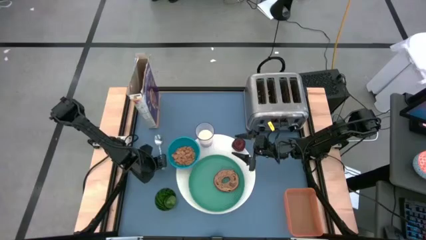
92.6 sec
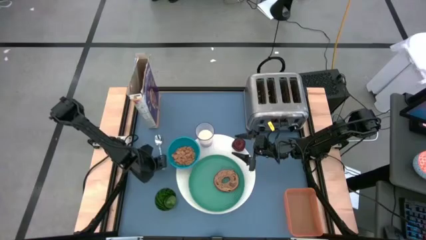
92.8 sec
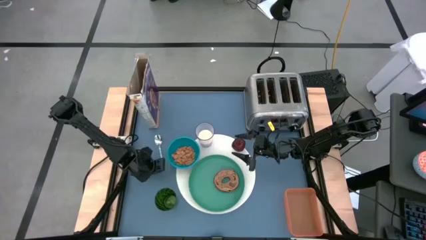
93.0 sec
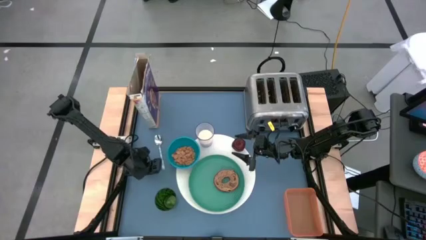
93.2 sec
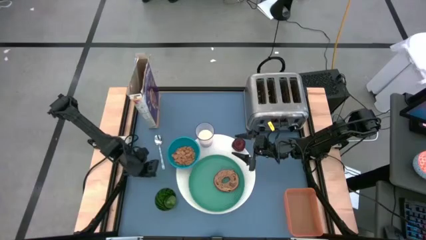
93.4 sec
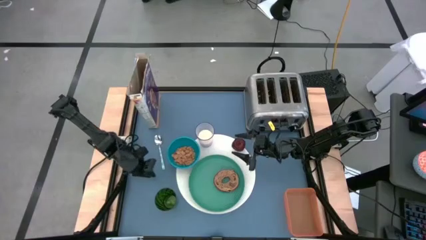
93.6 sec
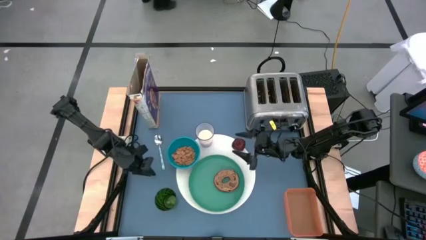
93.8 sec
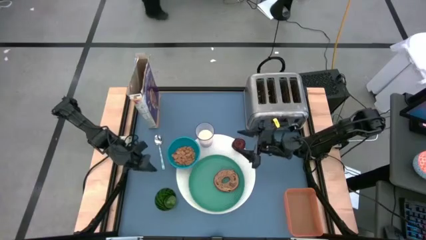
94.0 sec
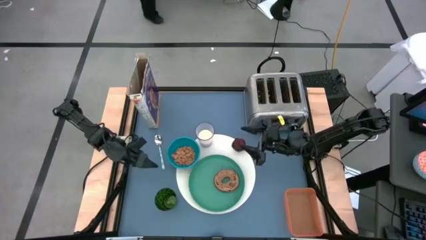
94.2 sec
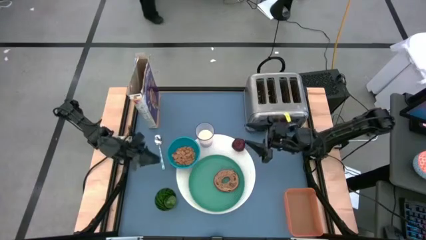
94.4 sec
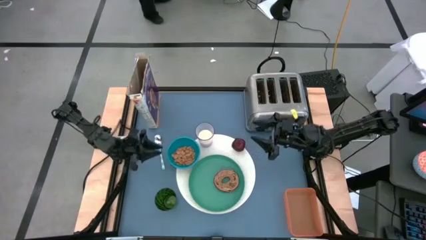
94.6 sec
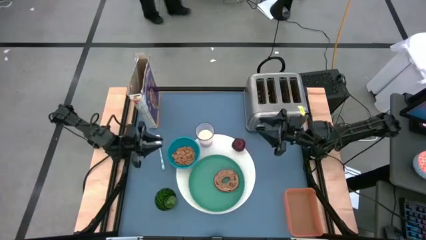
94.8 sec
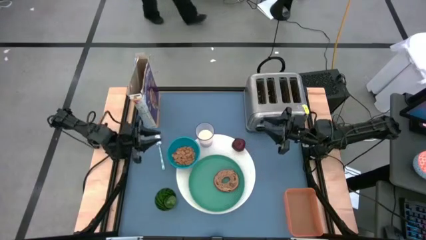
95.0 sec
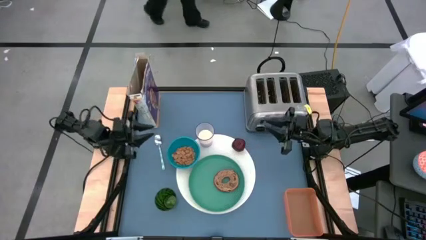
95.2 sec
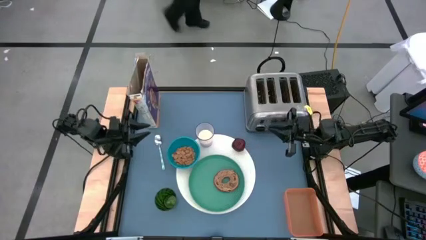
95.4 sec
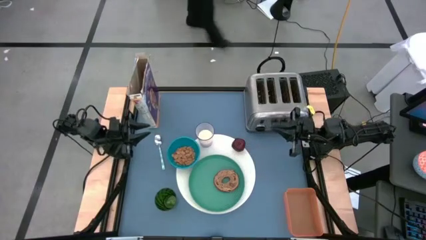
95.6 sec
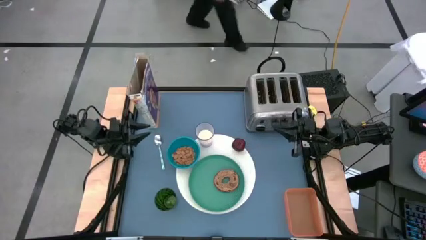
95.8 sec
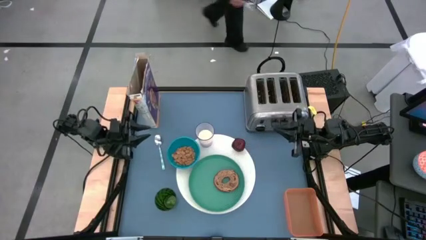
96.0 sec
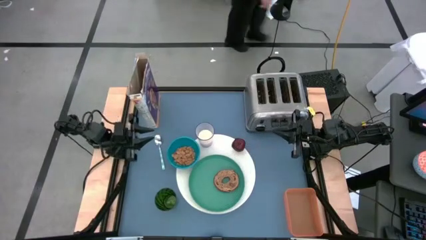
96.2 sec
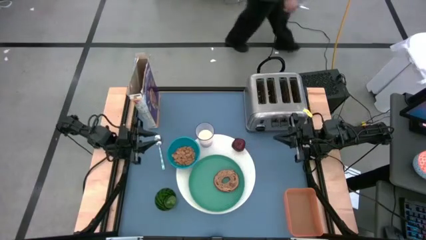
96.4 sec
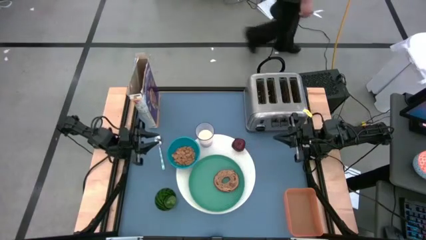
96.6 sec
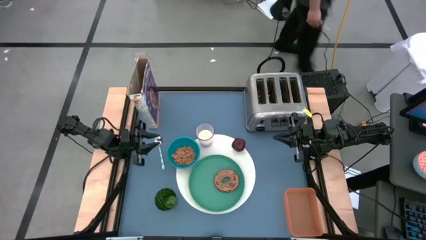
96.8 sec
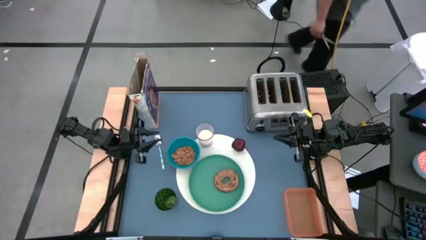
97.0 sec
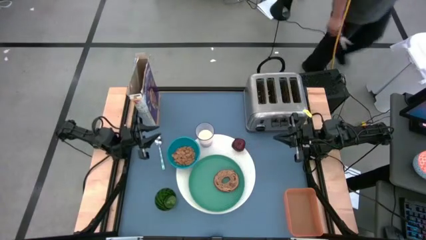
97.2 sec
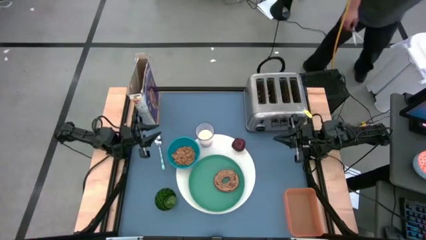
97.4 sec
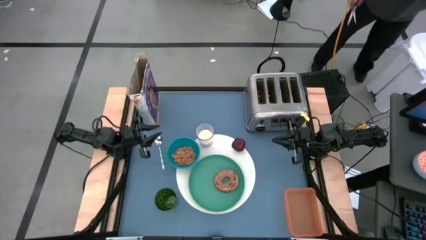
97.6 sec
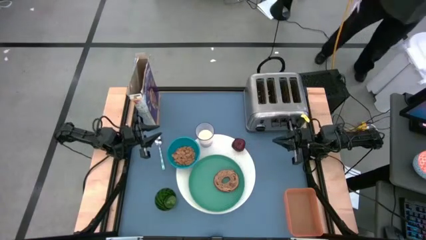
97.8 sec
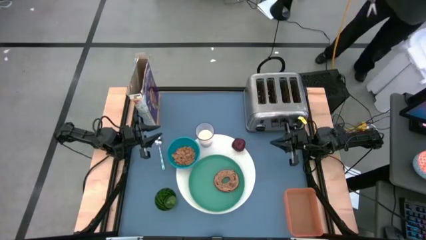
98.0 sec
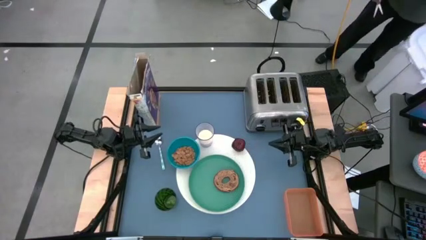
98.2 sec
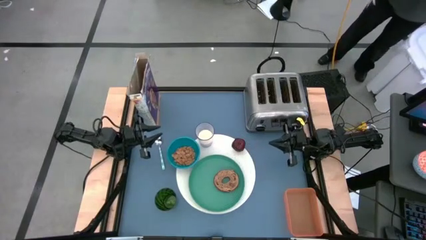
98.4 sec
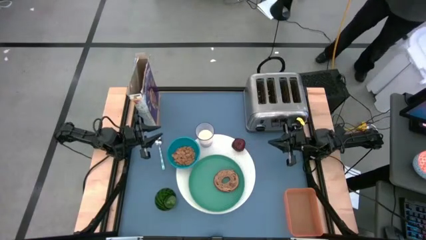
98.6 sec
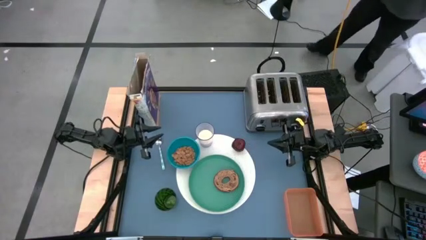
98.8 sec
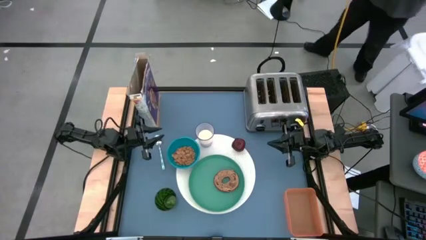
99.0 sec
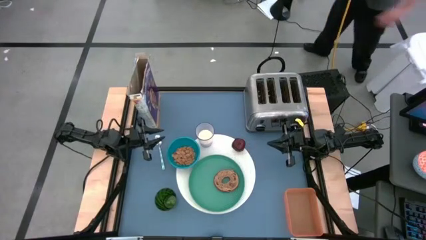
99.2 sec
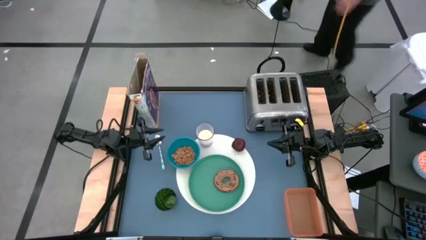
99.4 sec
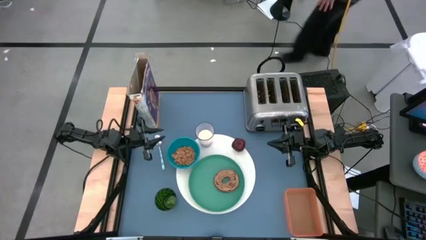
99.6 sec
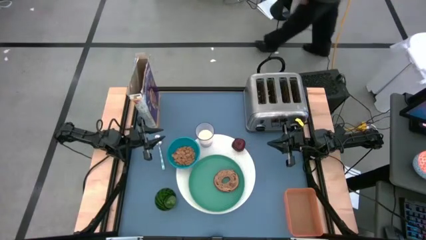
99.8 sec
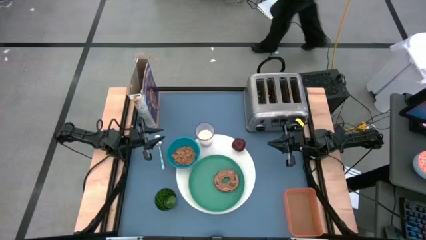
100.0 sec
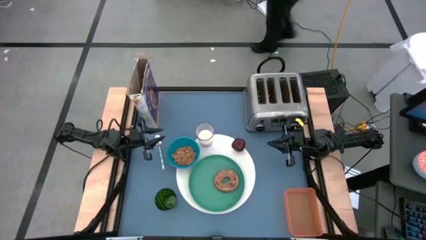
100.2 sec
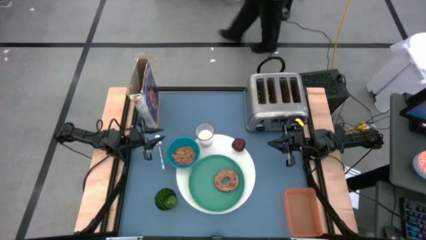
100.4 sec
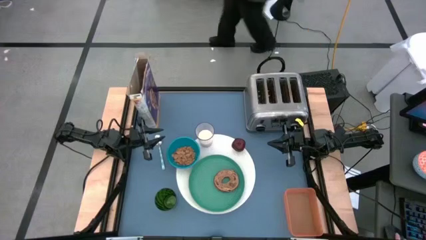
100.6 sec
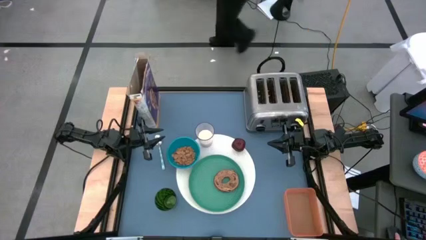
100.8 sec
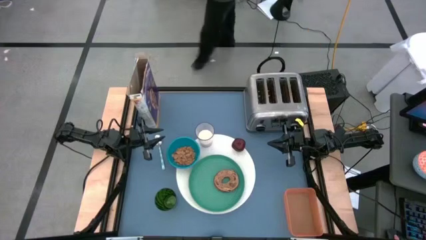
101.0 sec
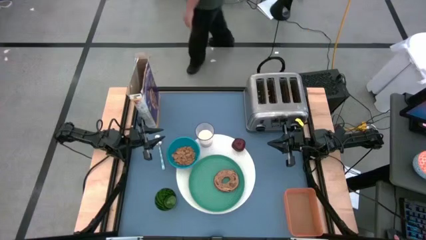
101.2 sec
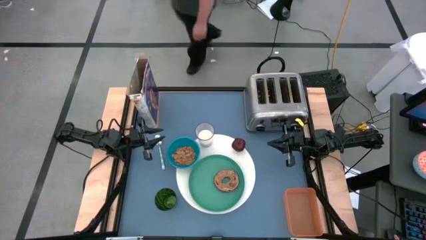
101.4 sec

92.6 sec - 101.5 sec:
Task: Arrange a breakfast setting
Return to Home Position

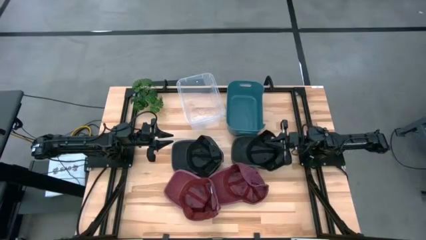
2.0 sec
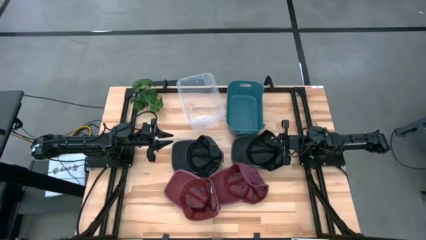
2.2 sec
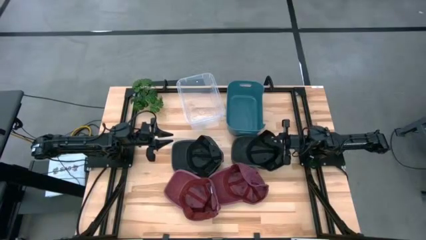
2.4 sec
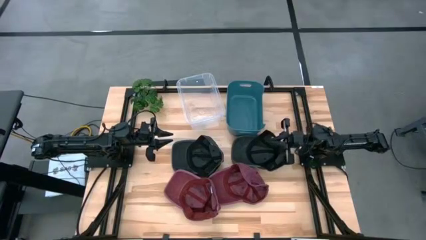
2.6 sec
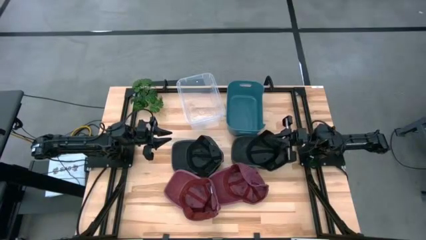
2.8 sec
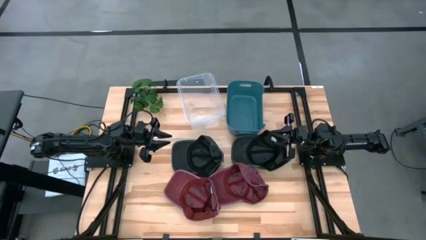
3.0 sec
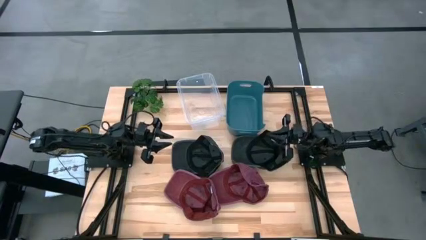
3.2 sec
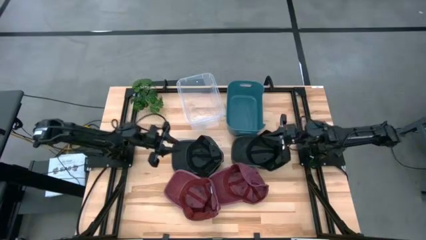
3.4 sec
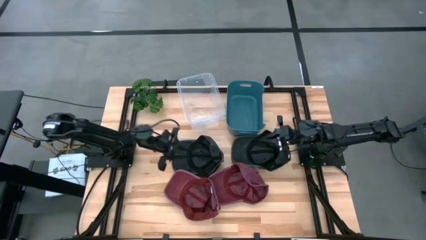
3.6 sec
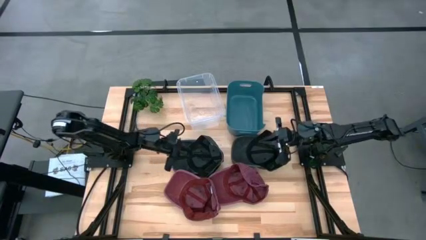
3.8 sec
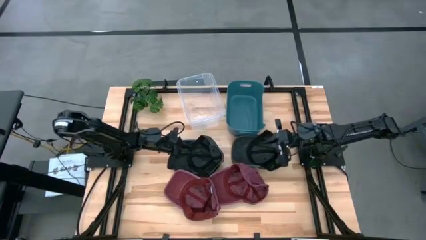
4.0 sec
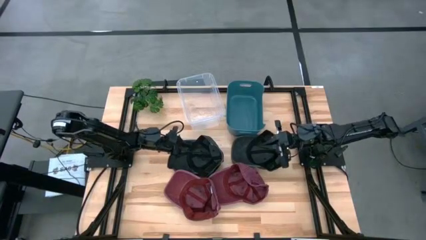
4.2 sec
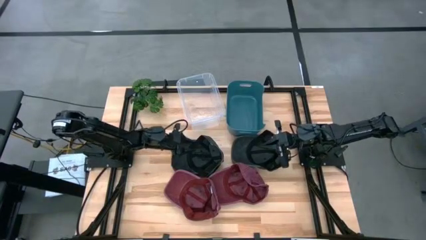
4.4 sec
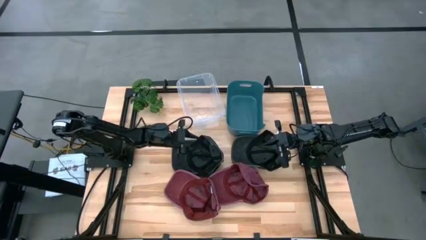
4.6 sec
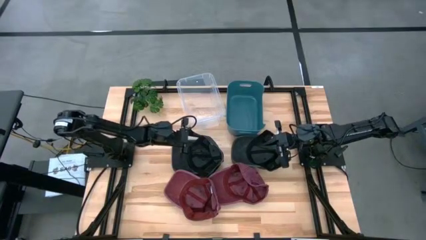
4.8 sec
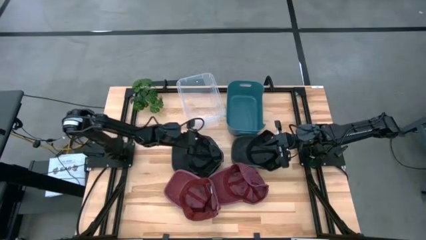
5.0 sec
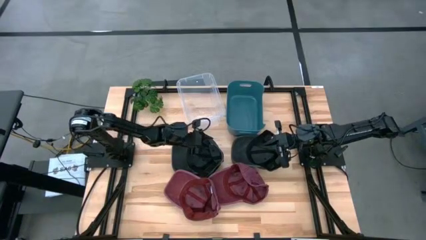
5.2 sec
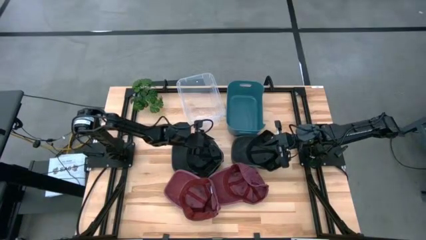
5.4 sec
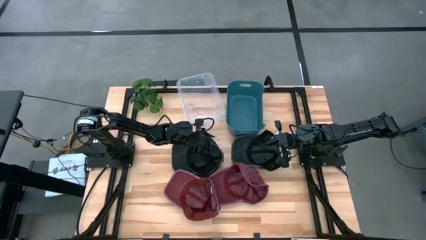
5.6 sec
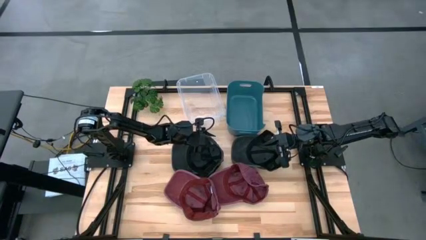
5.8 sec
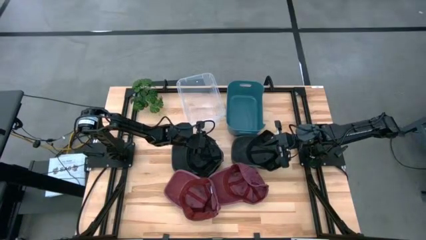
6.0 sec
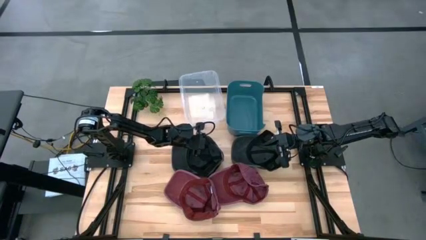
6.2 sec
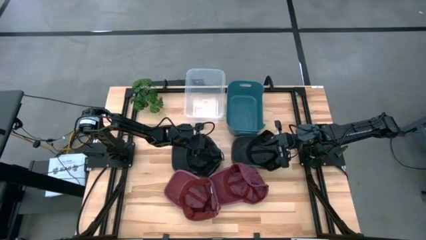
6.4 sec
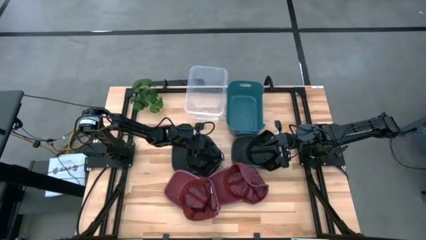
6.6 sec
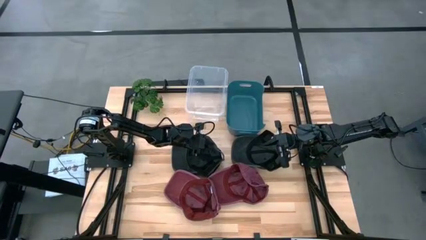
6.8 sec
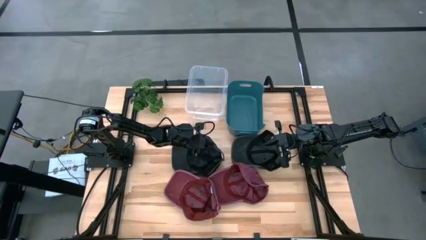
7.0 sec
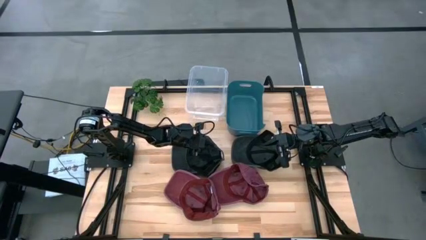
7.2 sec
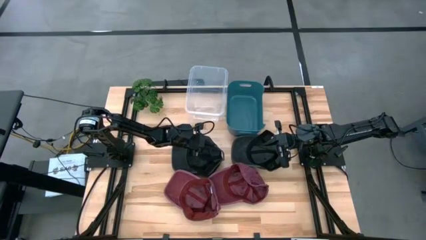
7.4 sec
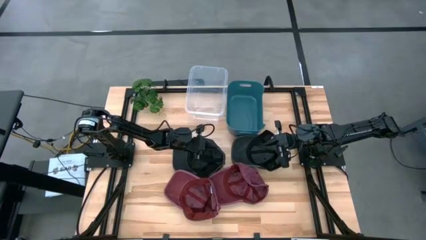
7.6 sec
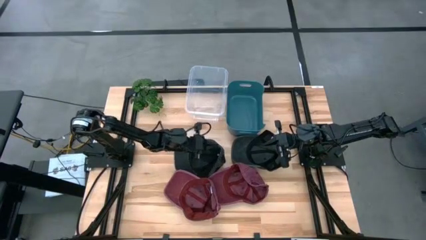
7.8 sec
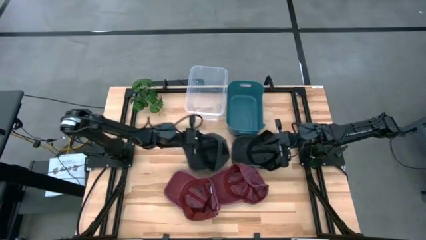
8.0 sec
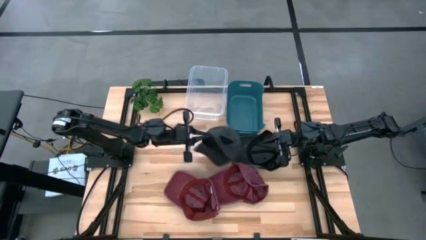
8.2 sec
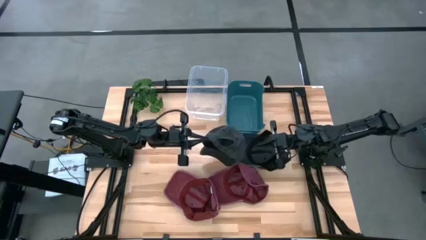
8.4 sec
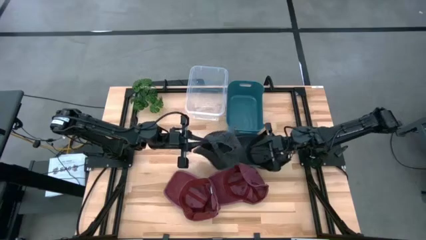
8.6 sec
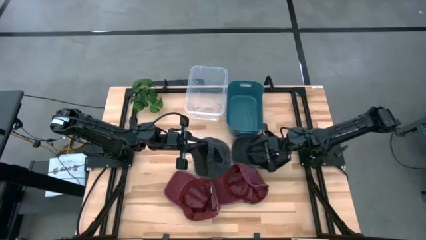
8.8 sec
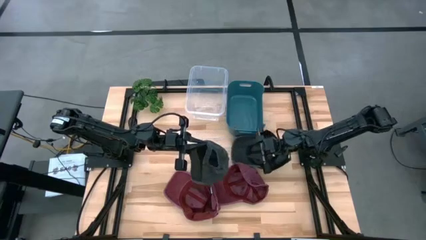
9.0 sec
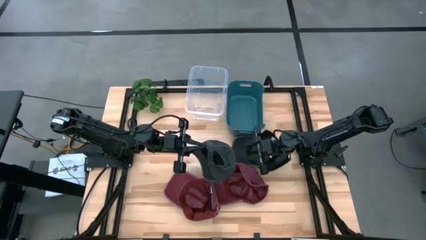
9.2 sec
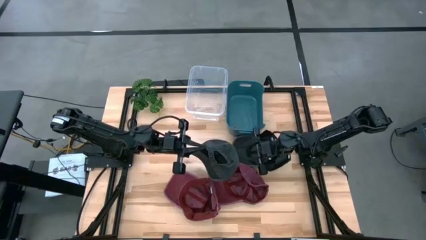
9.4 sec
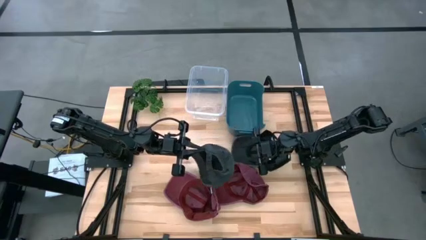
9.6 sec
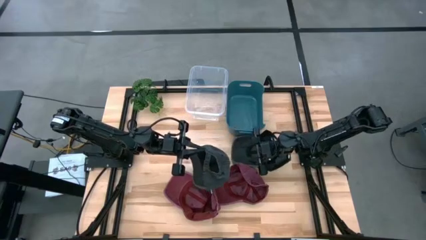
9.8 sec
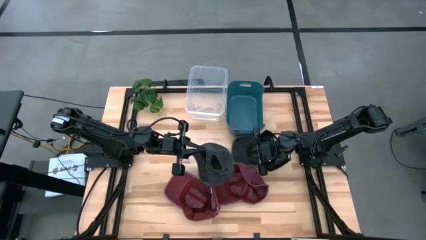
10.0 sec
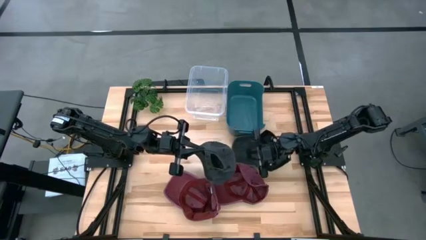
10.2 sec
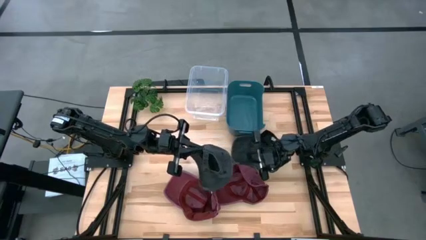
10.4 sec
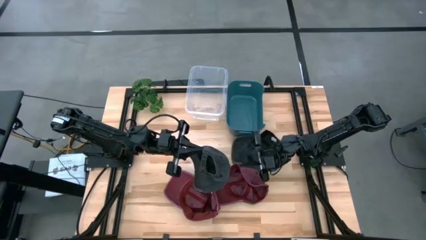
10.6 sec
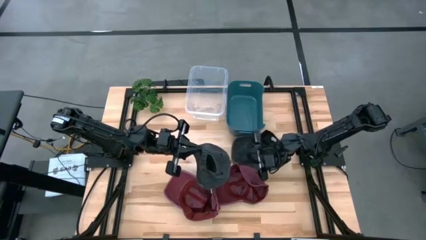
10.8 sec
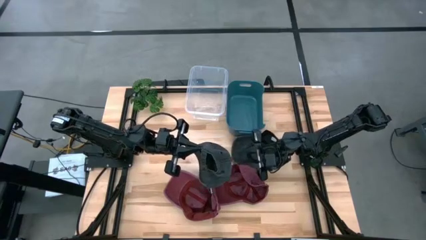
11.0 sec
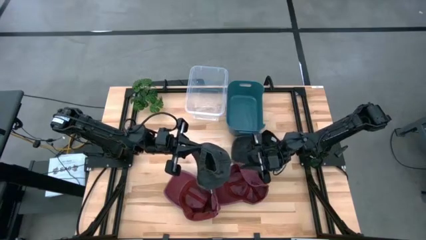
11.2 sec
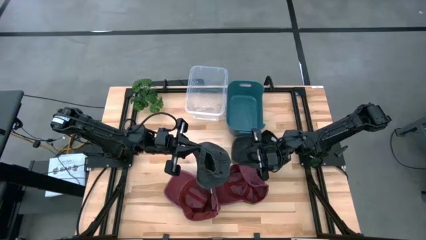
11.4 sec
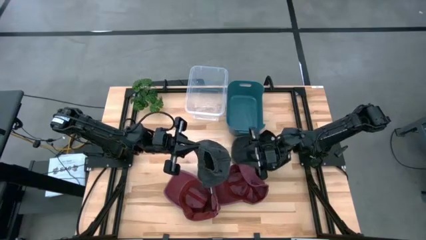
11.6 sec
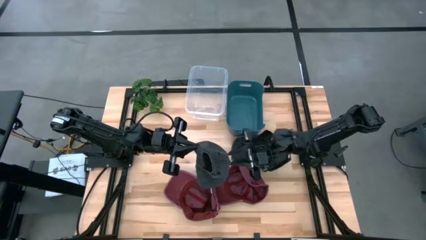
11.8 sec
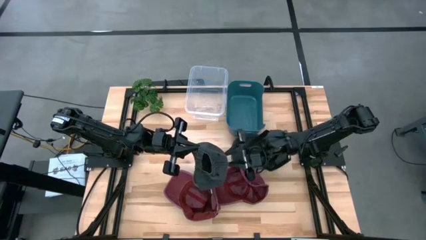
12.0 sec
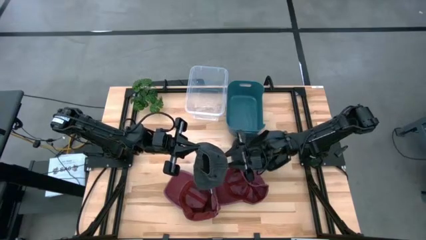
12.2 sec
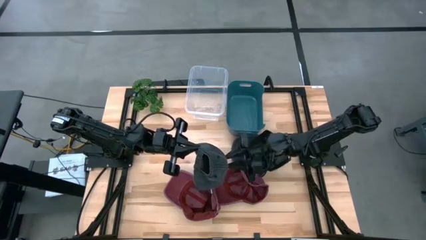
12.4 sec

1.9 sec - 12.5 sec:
Task: Pick & Place hat
Put the left black cap into the blue bin
